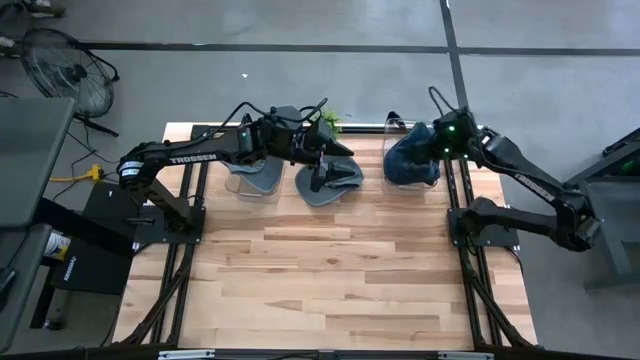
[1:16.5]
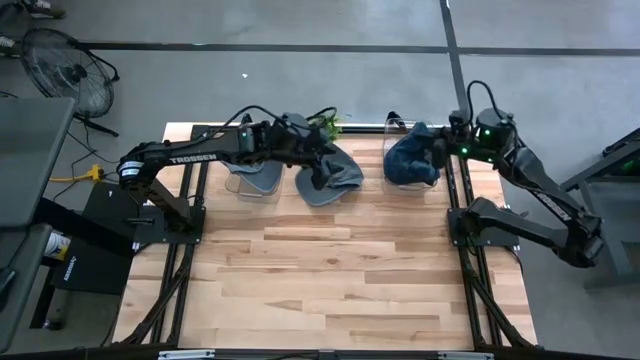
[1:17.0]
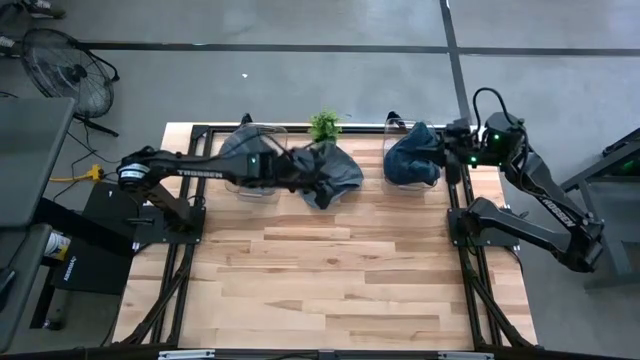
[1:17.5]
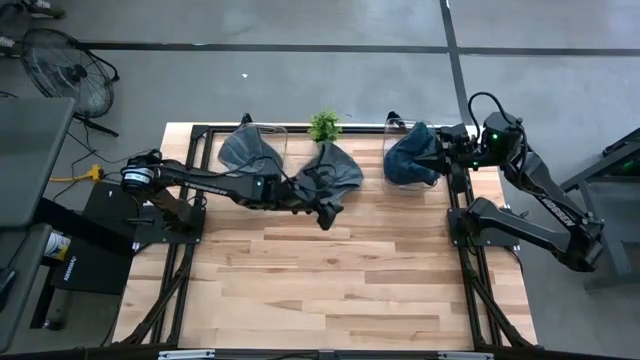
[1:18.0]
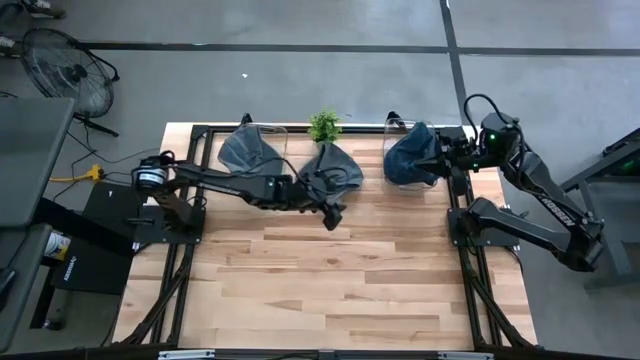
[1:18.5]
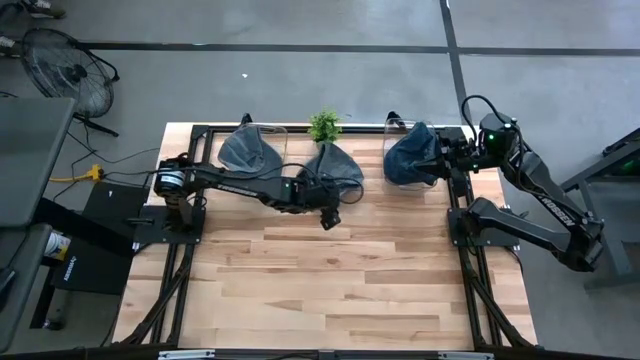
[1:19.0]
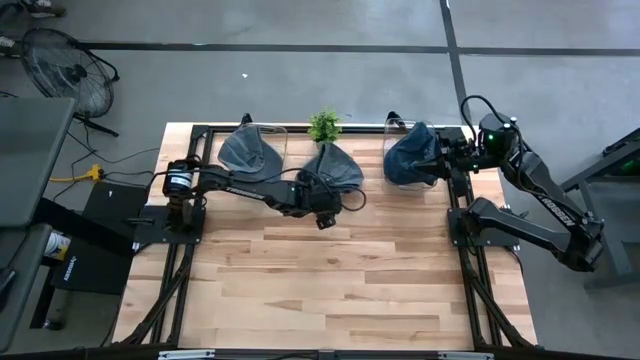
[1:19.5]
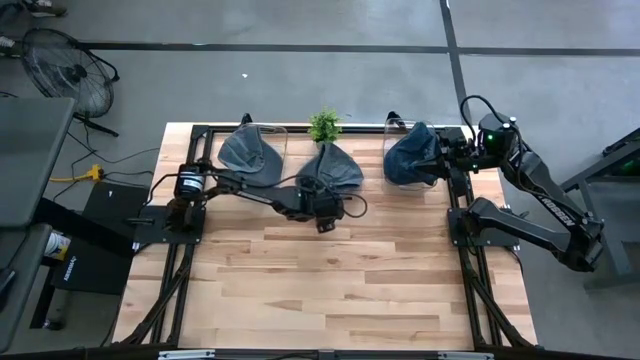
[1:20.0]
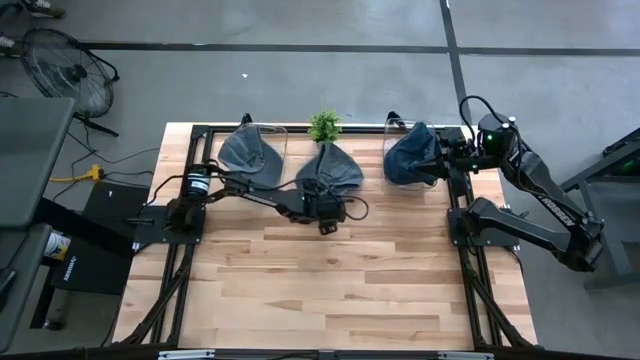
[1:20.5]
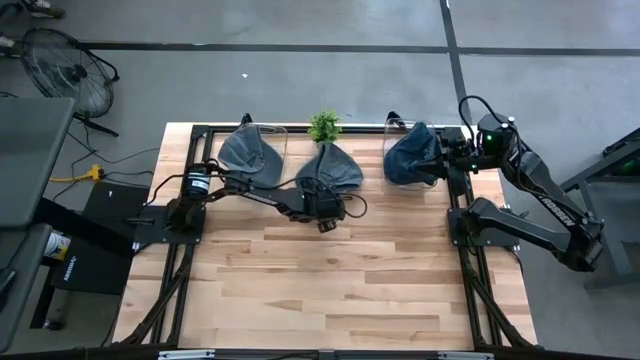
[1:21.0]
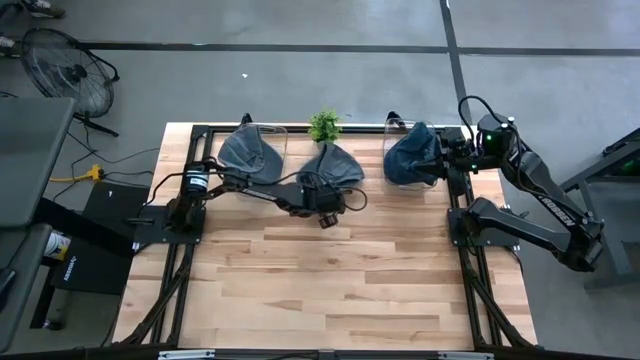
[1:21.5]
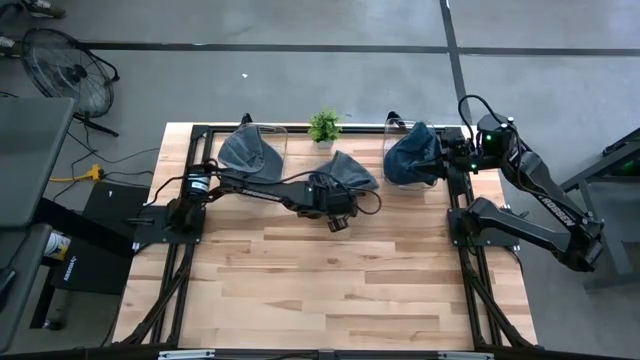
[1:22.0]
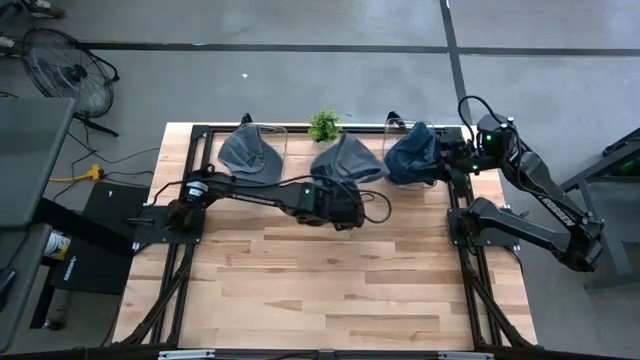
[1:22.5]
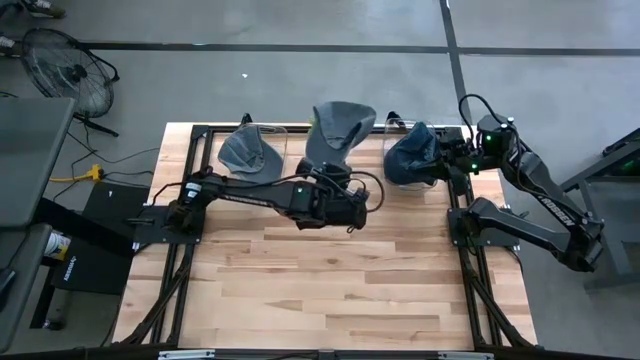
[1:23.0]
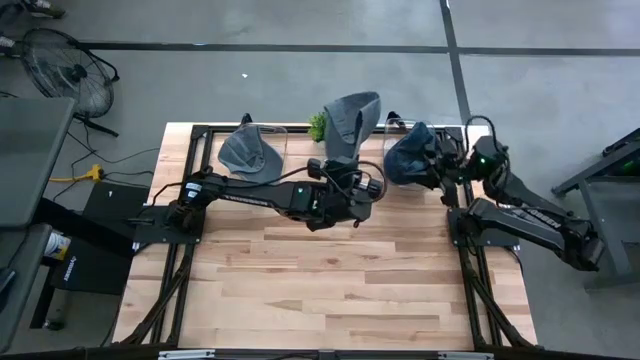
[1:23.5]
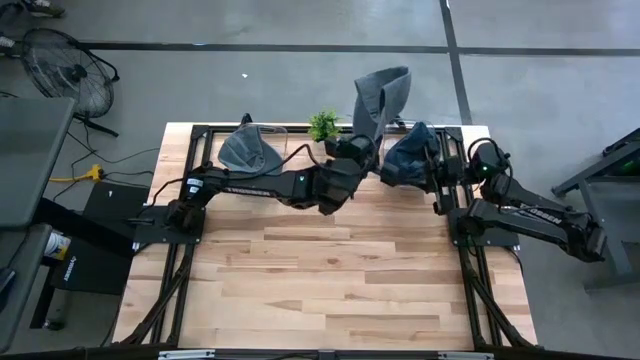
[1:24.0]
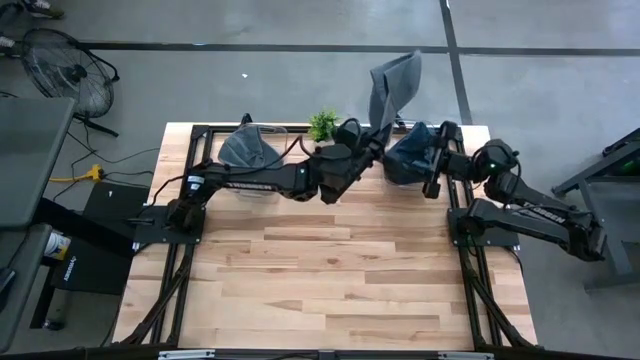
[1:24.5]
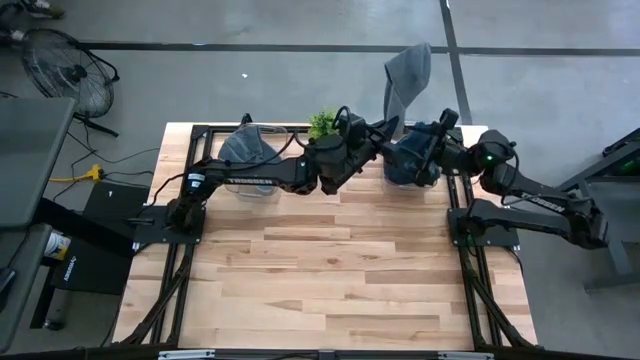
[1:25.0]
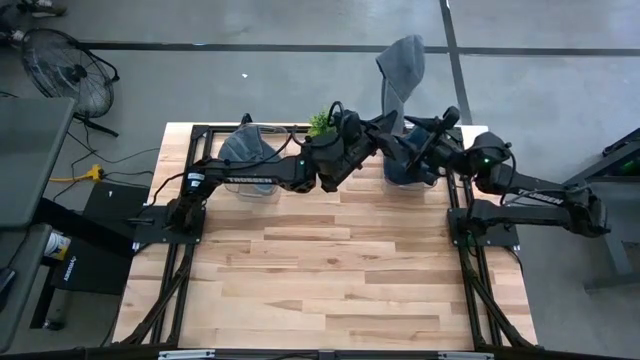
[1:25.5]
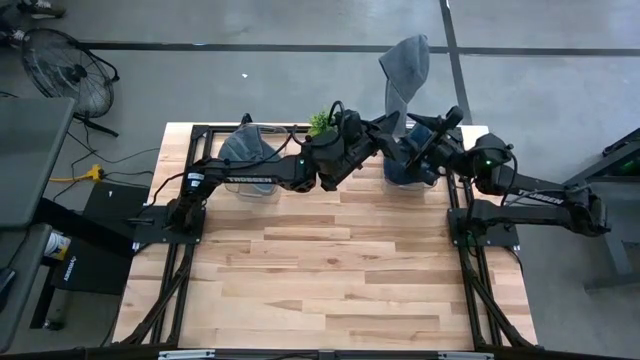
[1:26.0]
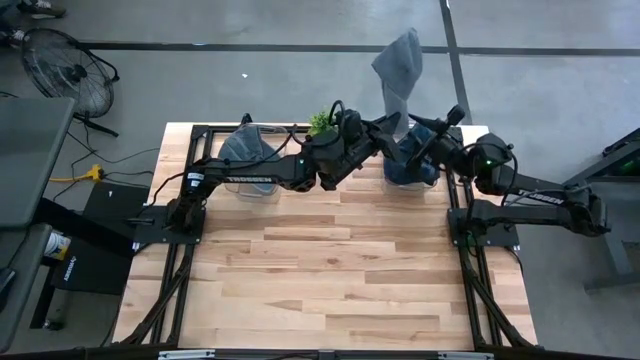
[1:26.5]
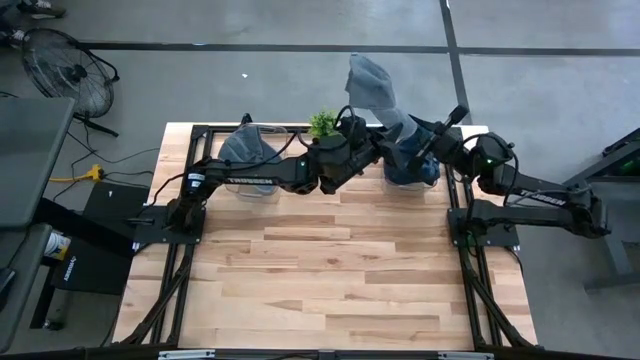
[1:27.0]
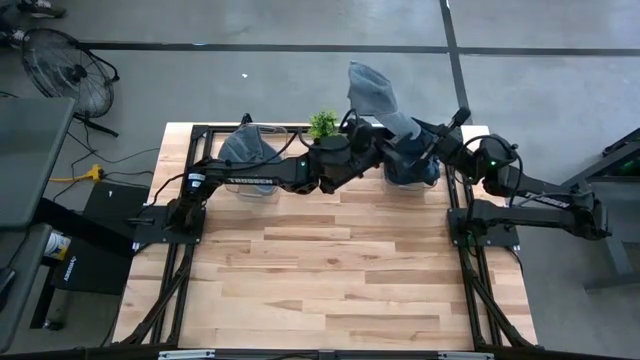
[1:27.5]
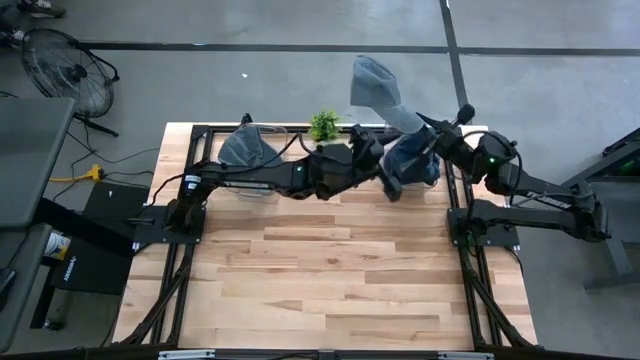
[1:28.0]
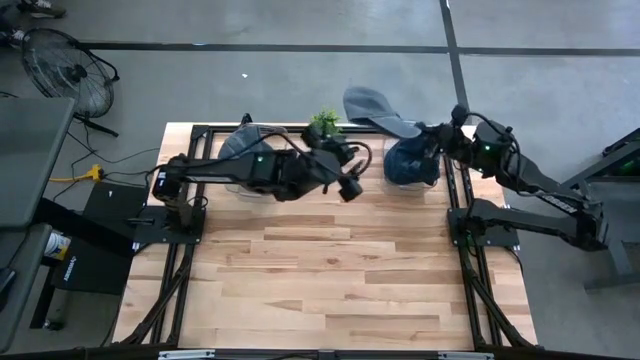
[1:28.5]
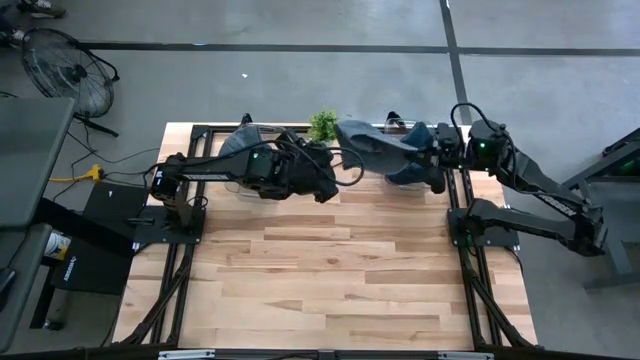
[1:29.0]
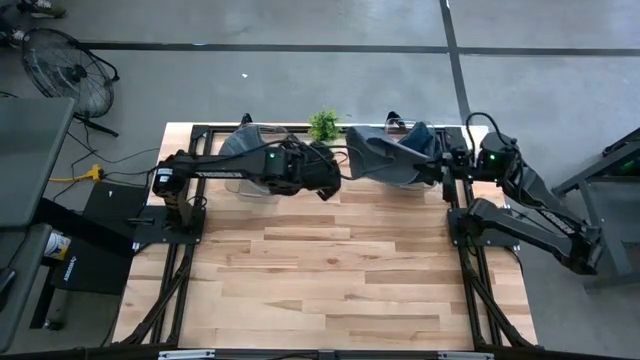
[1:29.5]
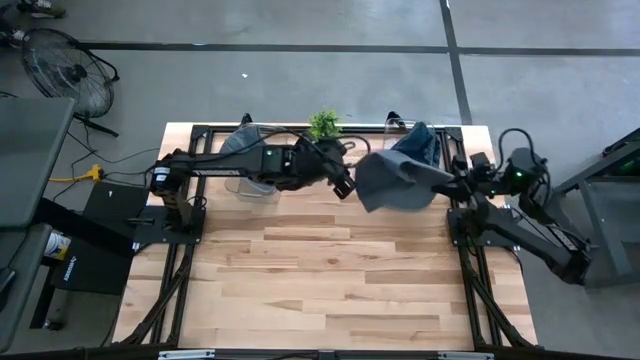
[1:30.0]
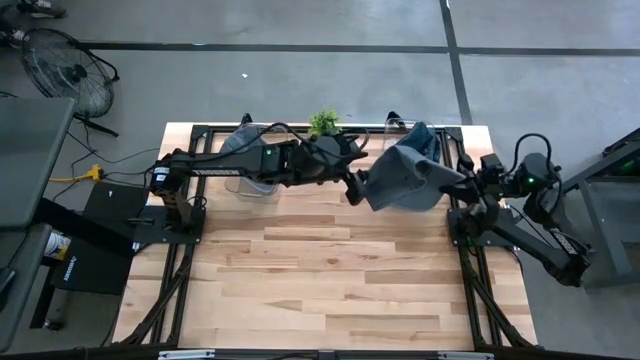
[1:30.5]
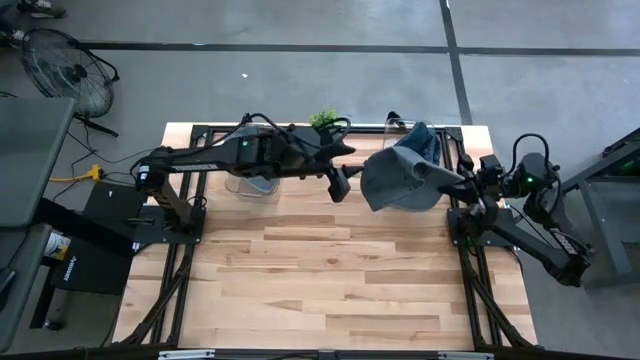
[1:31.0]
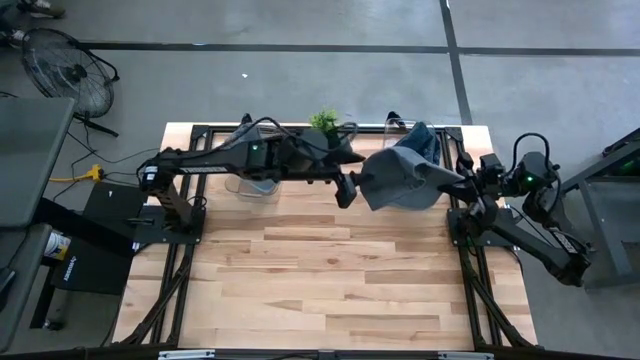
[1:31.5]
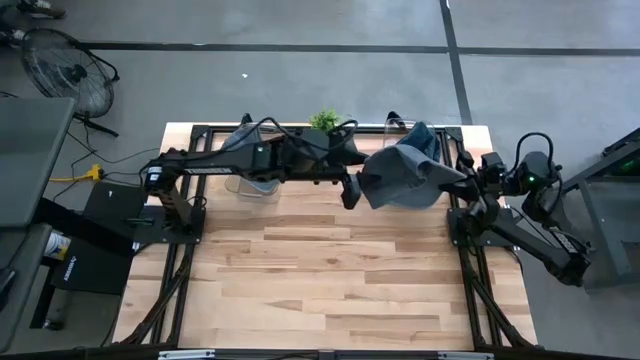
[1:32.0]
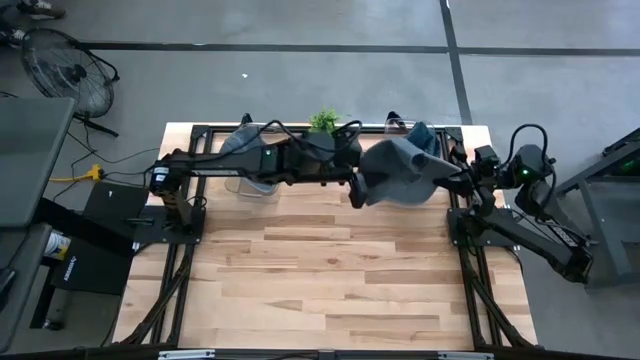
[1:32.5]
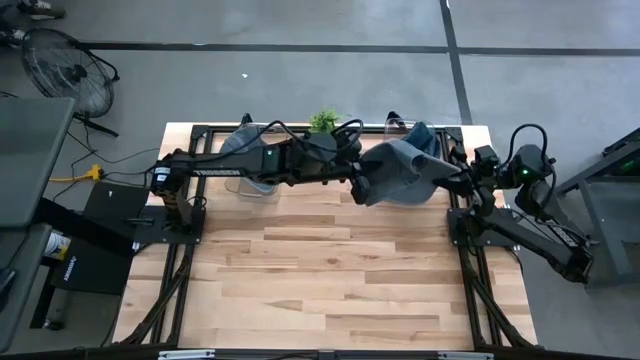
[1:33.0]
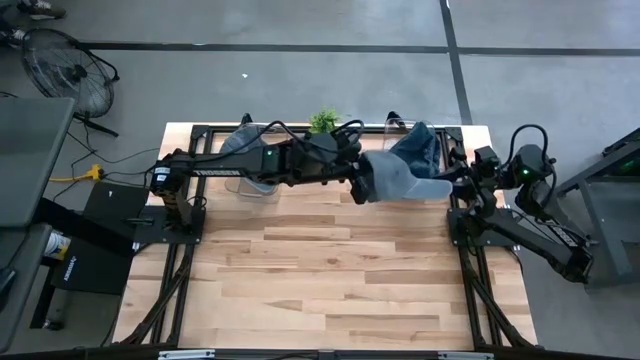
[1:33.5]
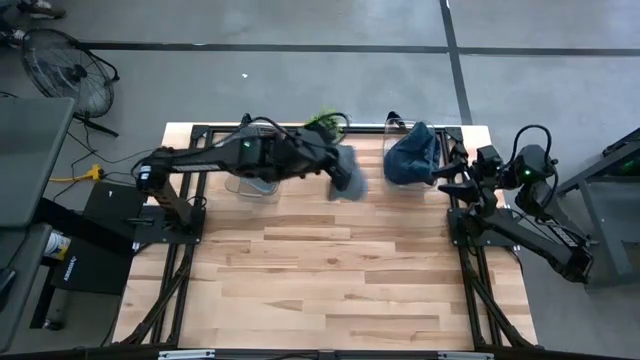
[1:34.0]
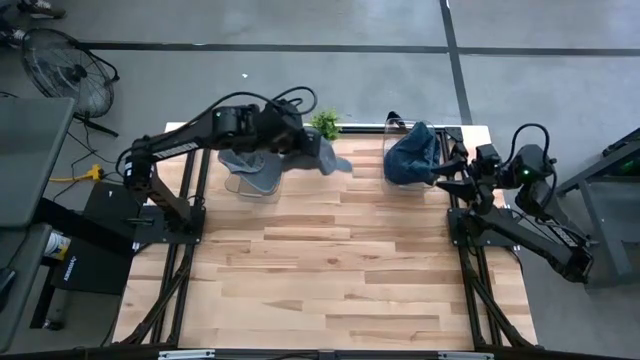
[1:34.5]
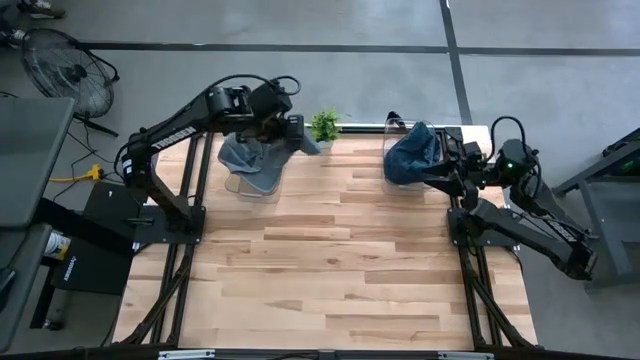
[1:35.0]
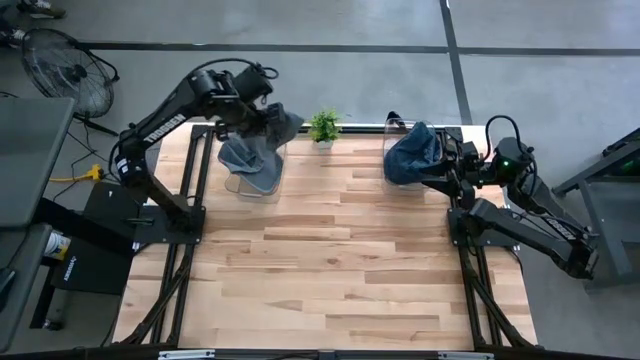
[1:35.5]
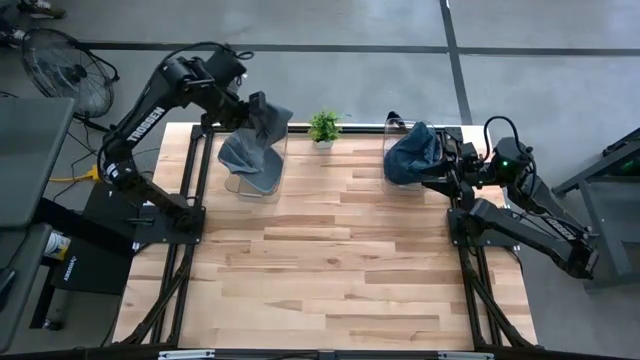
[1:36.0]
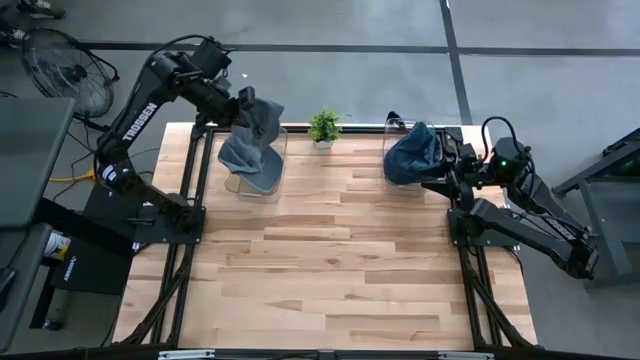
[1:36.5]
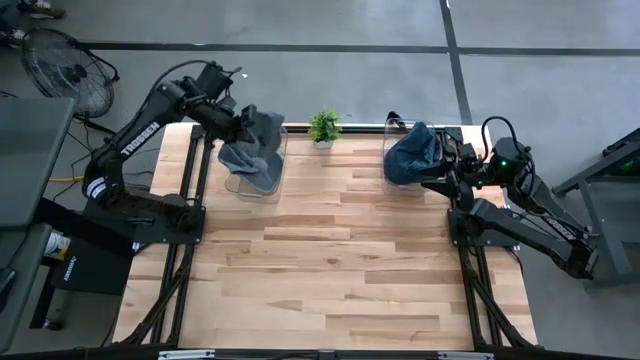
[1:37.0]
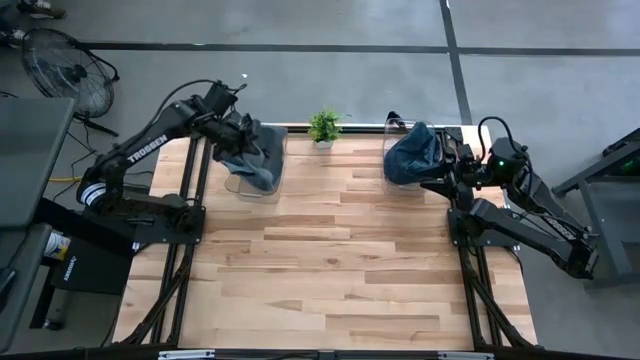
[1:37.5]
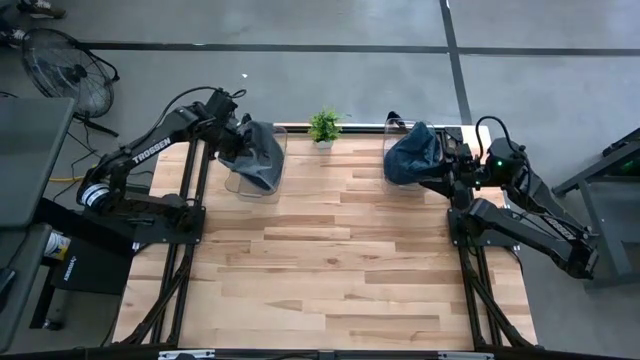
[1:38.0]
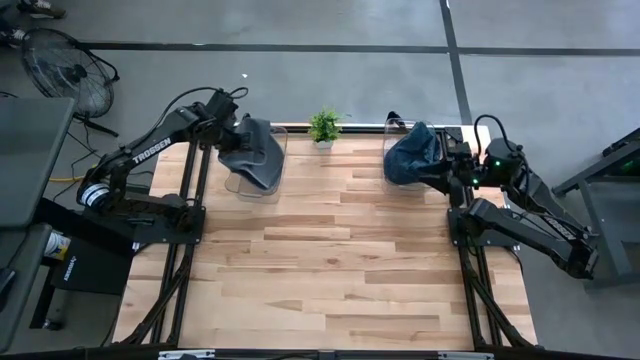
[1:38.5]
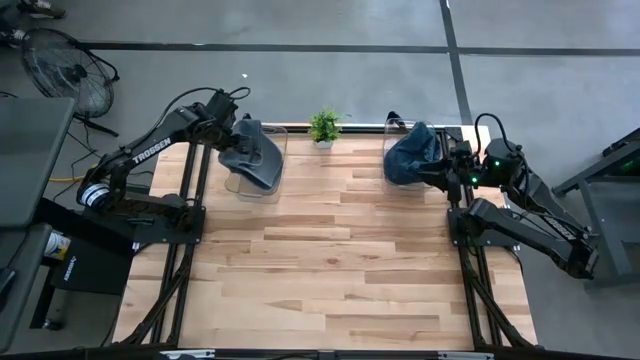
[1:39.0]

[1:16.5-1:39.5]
Task: Pick & Place hat
Put the gray cap into the left transparent bin
